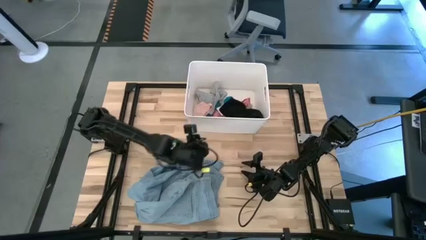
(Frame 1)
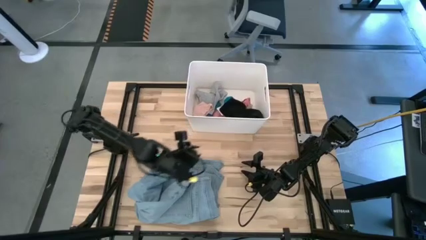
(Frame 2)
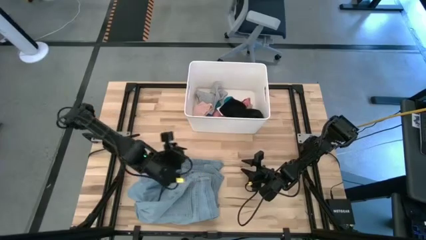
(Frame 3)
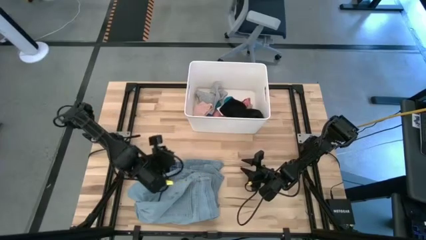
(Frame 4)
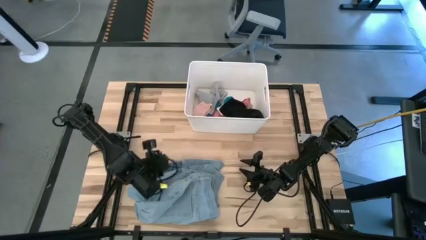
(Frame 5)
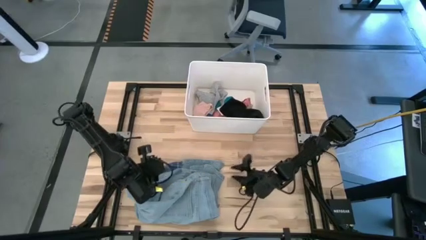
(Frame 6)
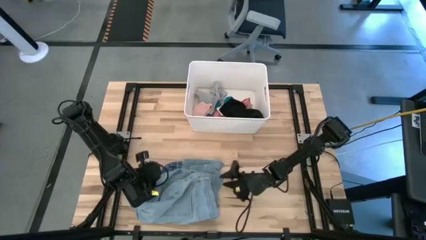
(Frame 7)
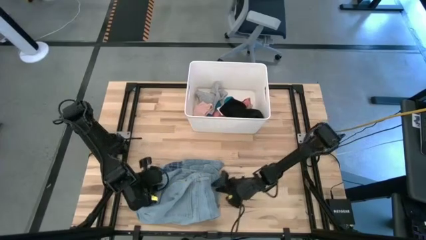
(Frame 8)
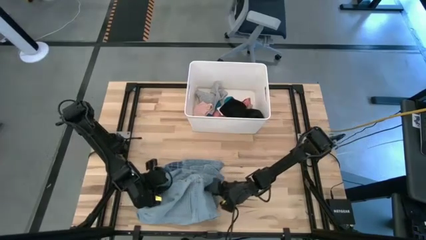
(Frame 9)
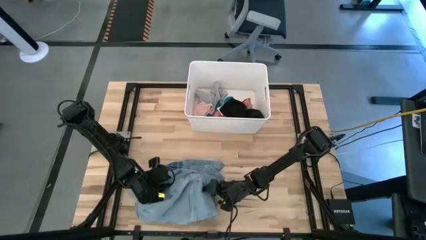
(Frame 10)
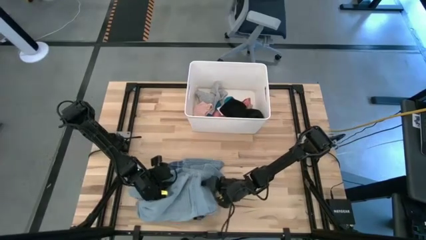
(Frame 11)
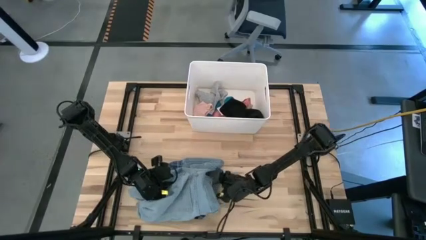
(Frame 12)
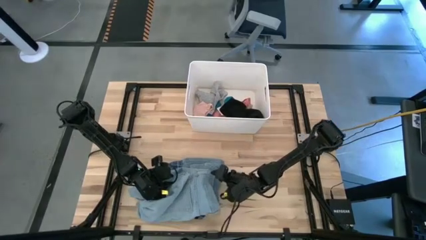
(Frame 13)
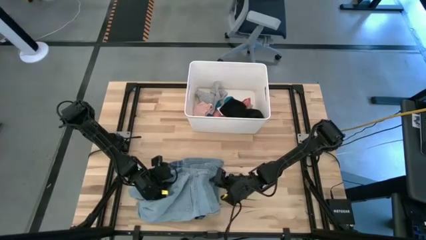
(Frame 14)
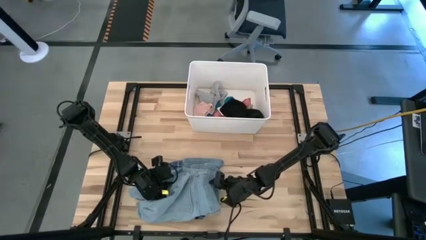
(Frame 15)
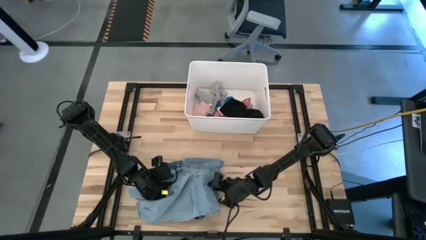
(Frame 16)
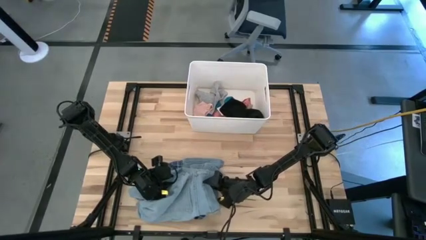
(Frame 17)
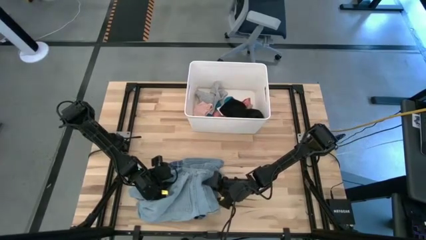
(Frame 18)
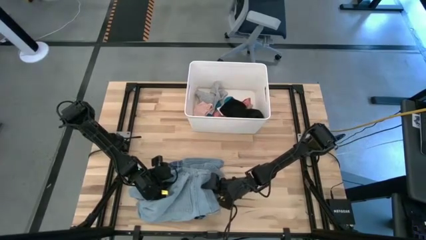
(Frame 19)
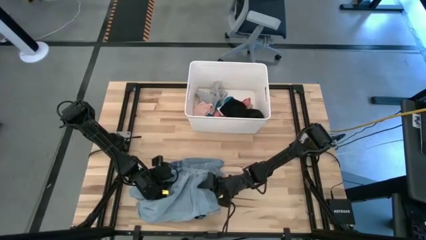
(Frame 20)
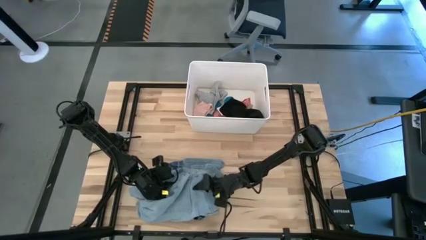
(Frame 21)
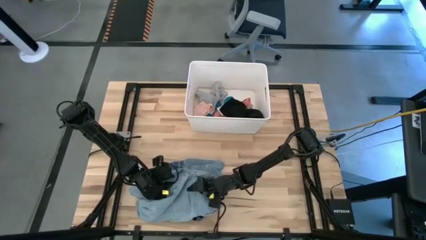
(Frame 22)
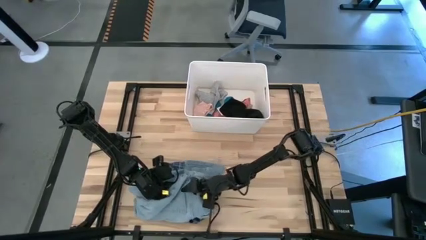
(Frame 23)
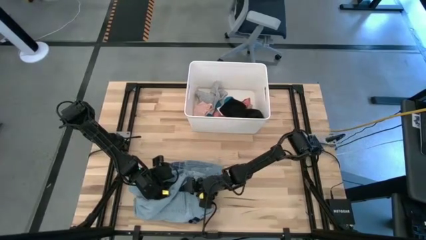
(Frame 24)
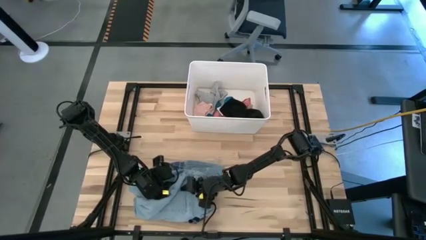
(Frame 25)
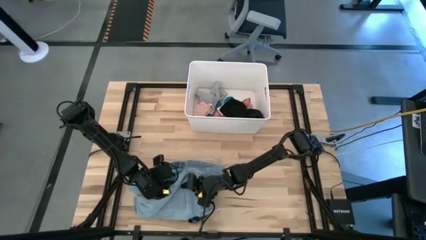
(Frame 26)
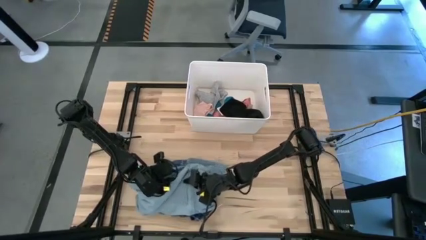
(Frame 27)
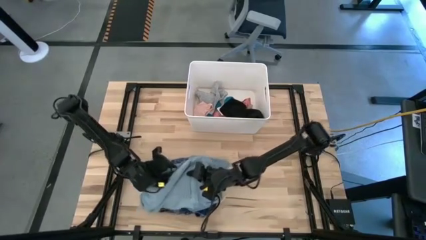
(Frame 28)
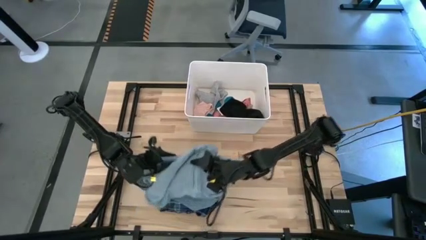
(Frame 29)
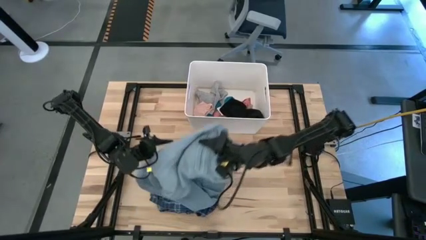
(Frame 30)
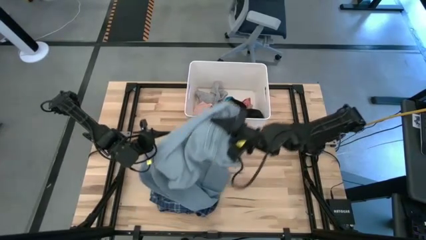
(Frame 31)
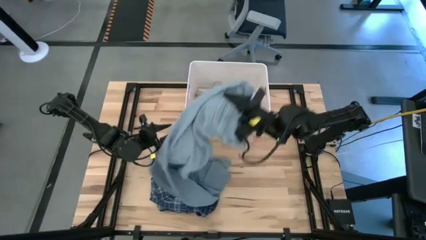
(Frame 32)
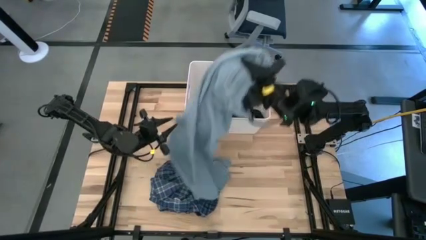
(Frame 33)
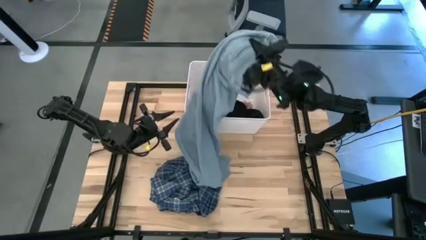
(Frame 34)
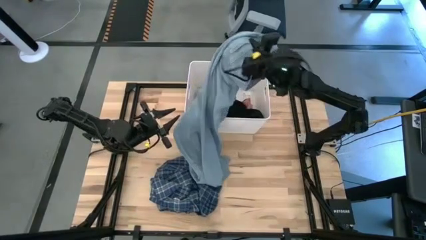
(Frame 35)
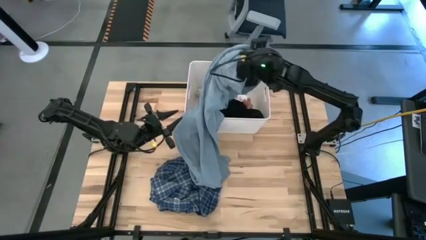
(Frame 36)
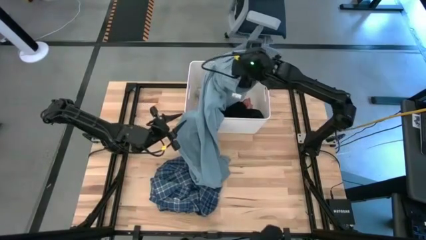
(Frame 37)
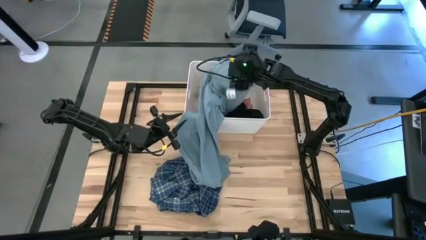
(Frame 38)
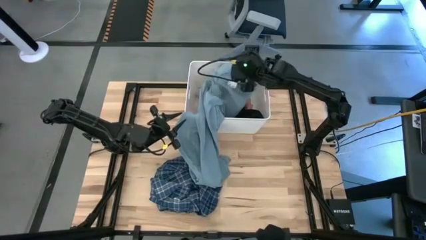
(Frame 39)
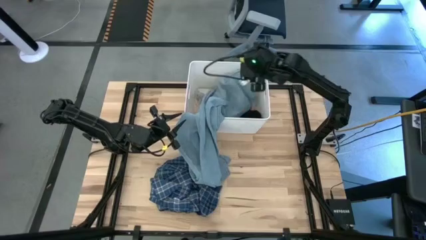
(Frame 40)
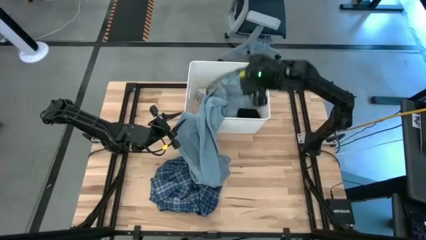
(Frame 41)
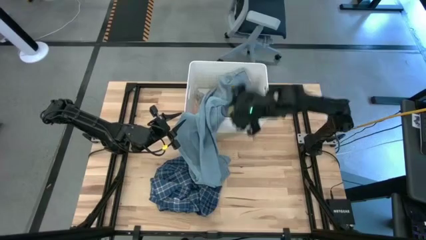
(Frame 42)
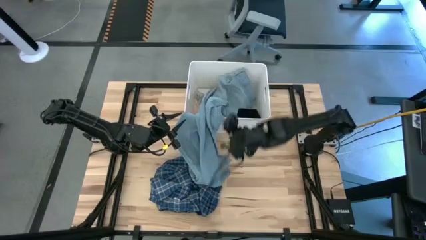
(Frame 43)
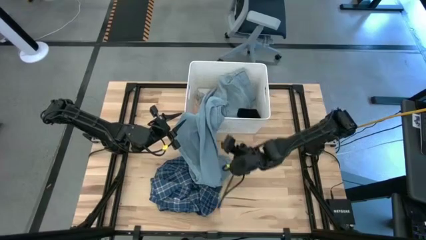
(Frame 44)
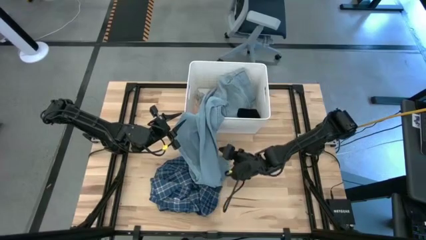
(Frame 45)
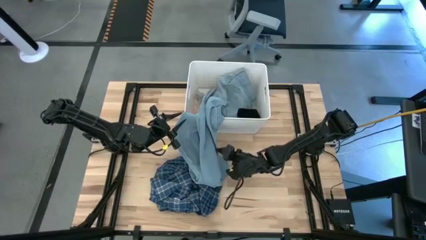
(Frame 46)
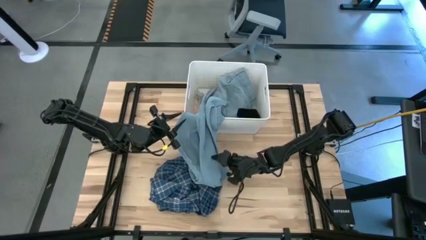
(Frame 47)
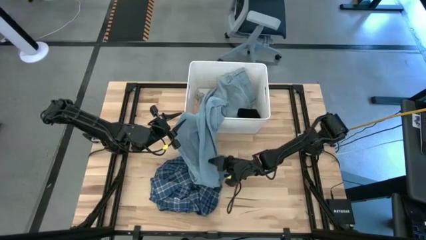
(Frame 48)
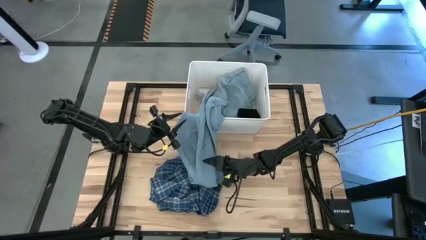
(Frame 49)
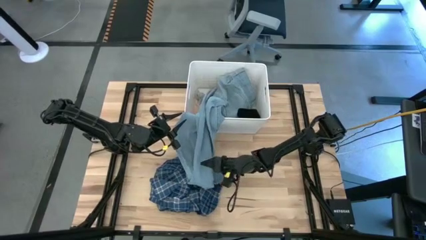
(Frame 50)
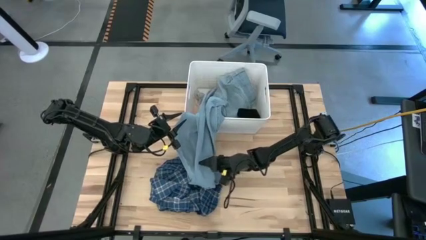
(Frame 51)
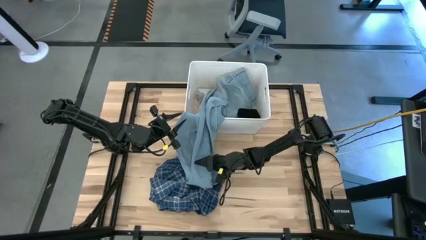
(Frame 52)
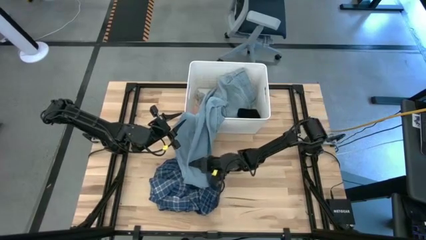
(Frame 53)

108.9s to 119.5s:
Task: Sort clothes
Put the blue pants into the white laundry bin

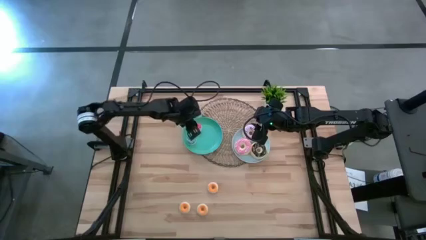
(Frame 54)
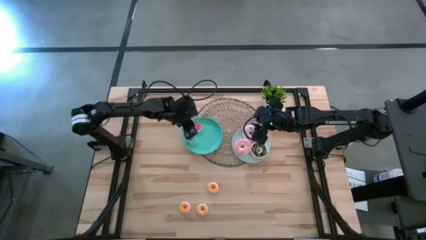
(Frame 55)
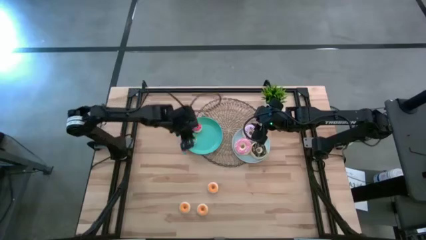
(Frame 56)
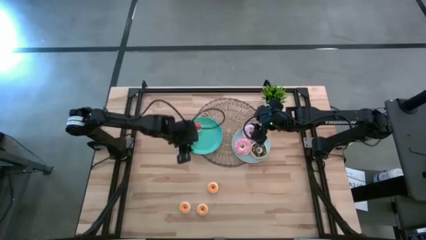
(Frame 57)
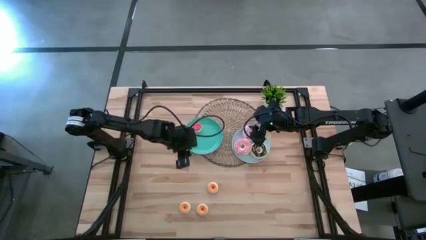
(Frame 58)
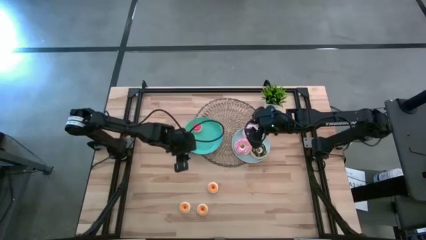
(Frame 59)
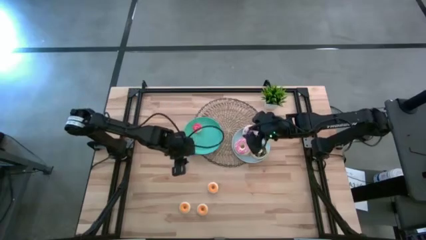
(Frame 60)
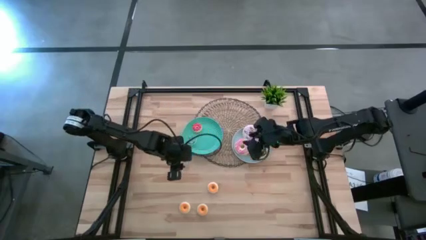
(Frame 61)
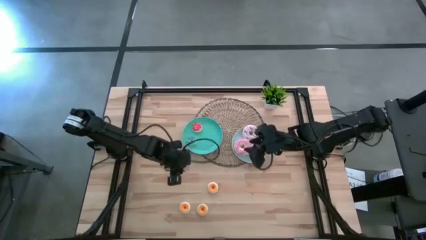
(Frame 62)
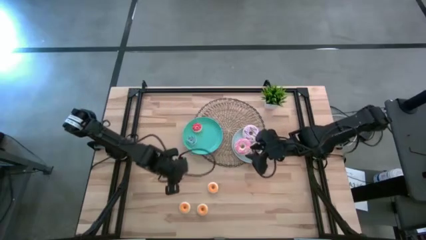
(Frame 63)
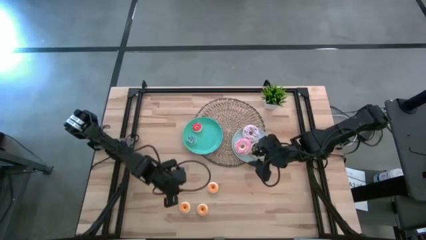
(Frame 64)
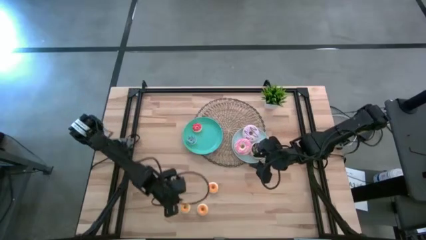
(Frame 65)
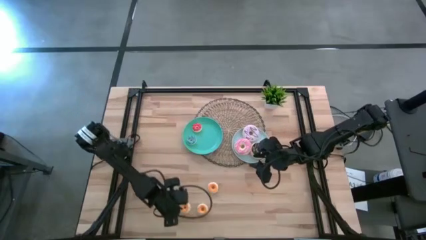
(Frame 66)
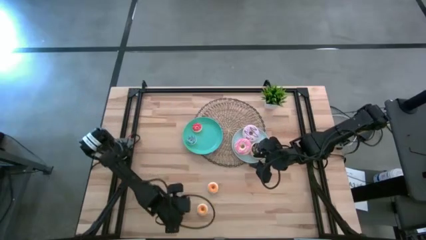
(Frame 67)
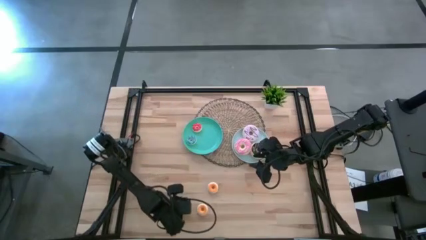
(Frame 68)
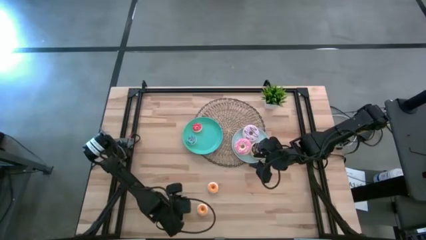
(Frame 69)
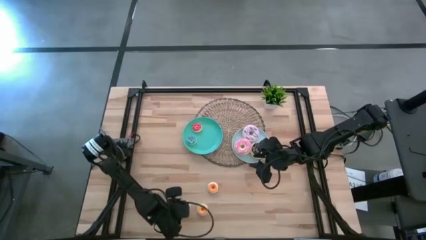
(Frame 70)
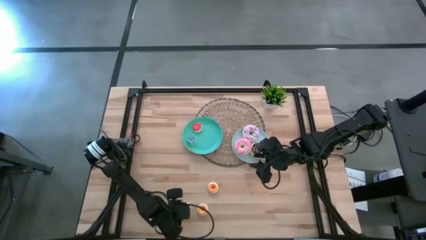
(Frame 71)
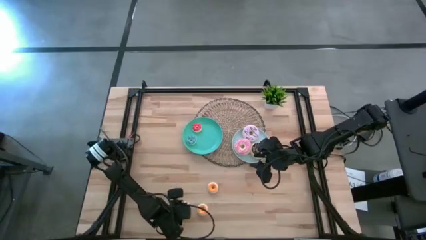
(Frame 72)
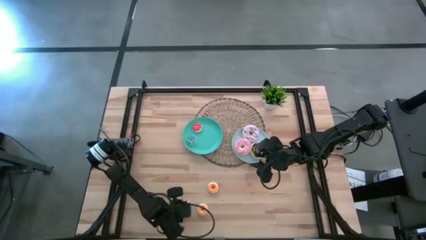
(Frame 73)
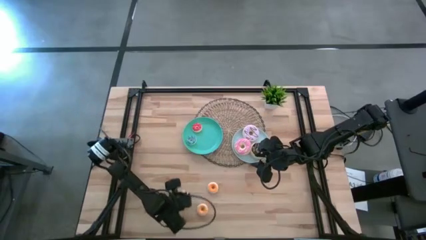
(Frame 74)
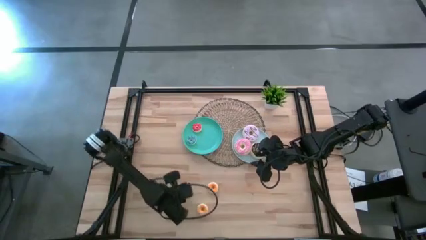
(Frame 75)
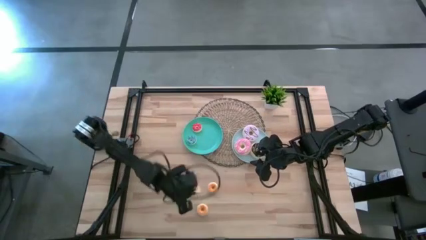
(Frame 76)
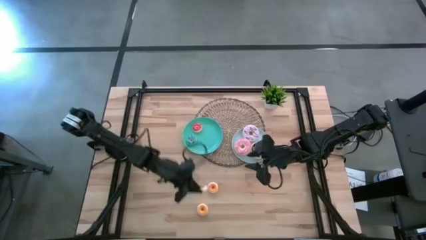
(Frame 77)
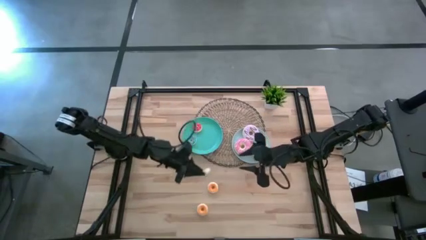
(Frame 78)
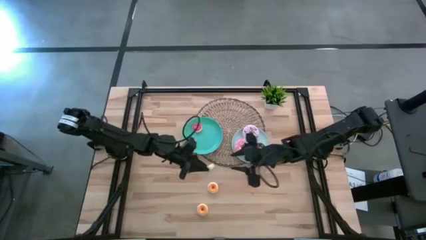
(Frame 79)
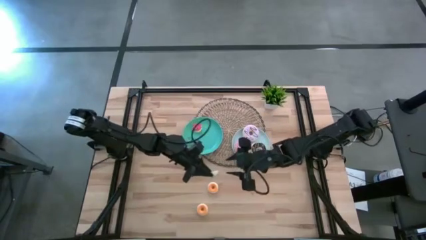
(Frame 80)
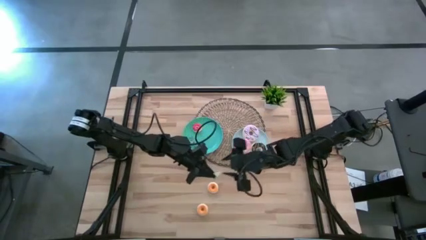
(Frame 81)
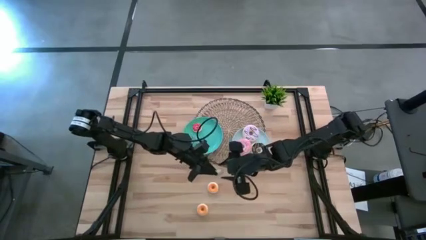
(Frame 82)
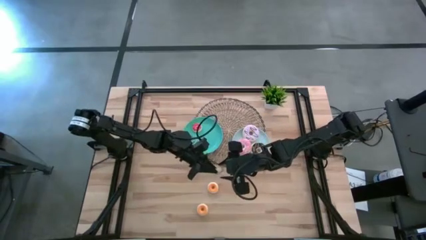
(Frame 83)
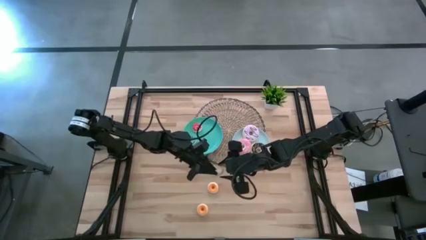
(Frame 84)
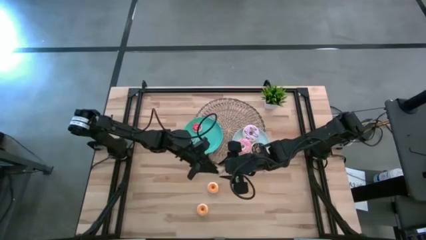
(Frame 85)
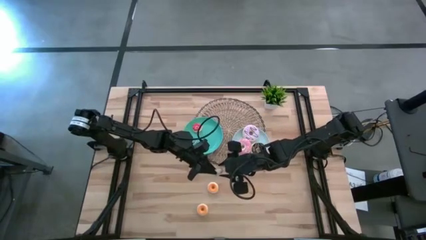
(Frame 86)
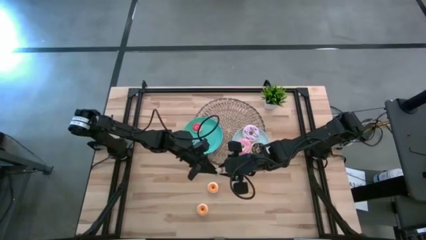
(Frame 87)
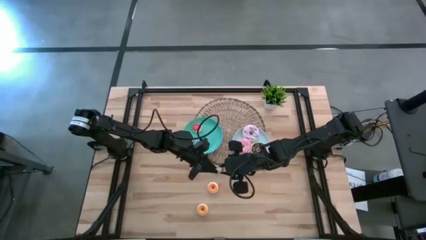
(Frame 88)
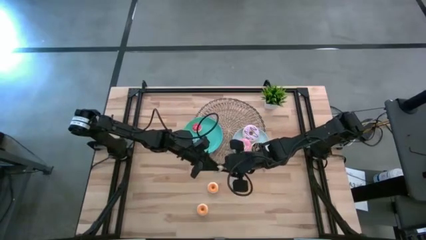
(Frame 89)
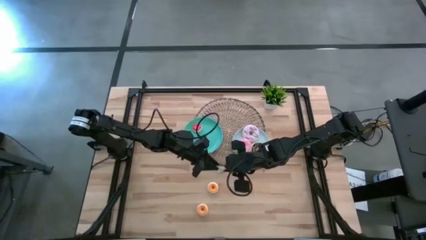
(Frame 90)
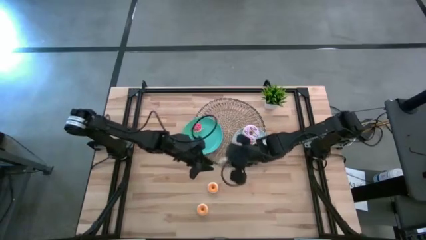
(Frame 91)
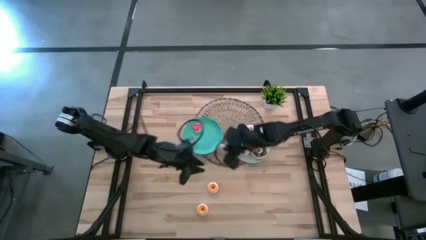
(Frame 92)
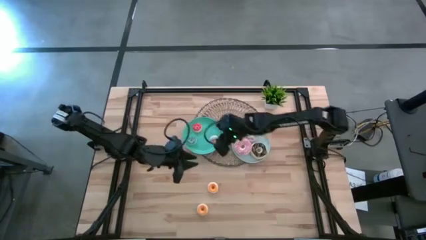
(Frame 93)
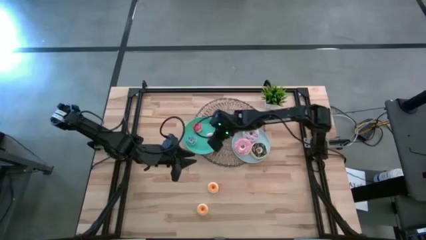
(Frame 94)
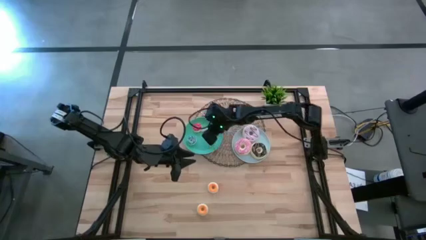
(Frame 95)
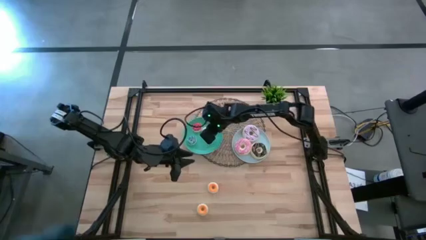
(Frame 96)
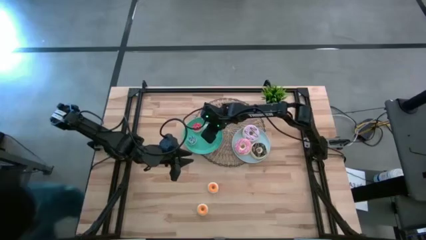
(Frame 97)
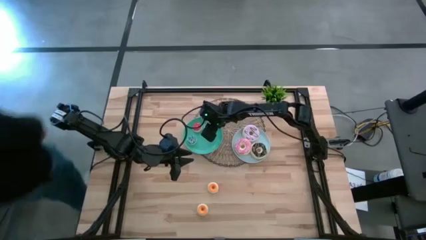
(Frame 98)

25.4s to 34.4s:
Task: Pick & Place donuts
Put the small white donut on the green plate
